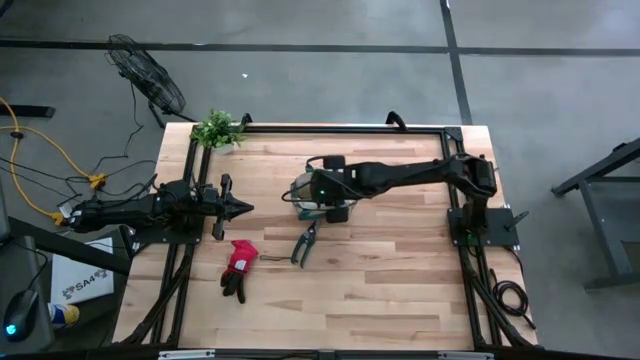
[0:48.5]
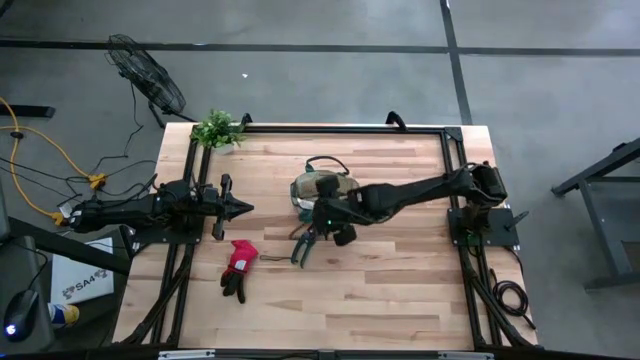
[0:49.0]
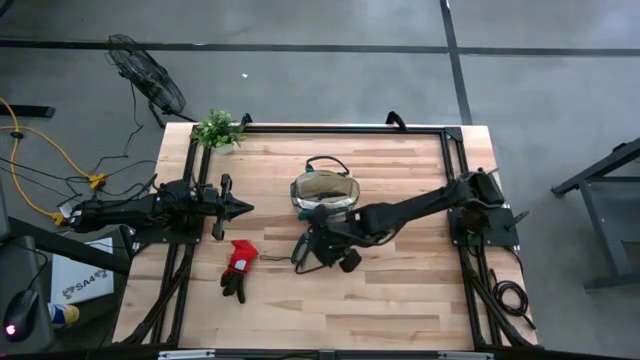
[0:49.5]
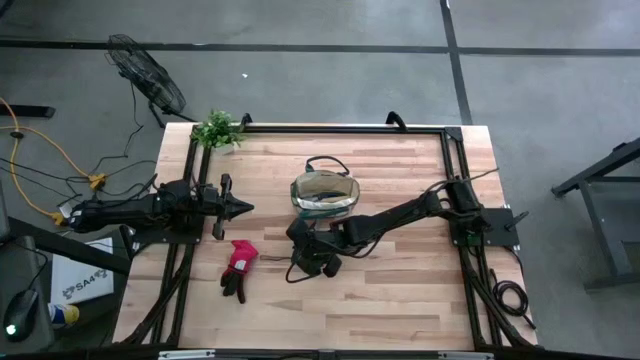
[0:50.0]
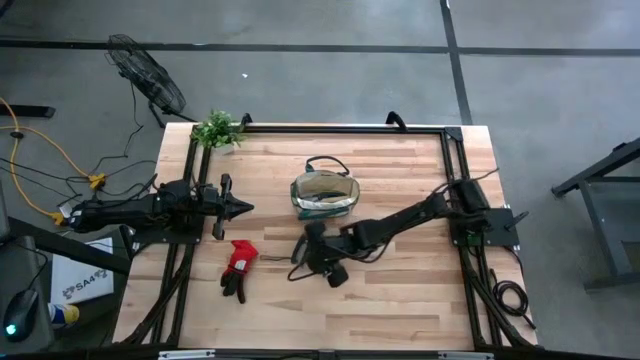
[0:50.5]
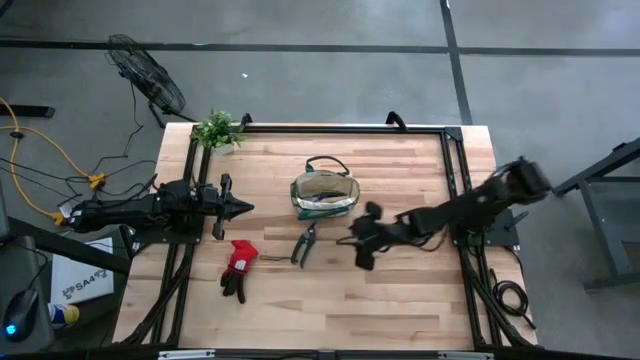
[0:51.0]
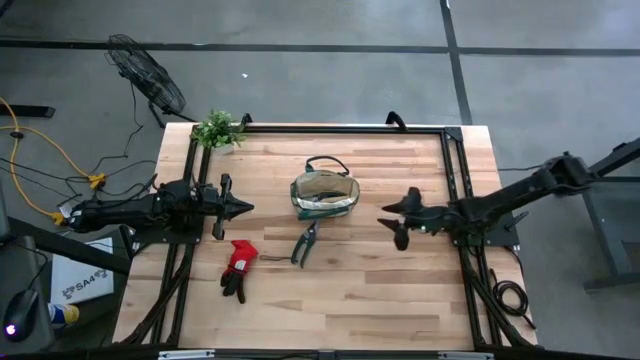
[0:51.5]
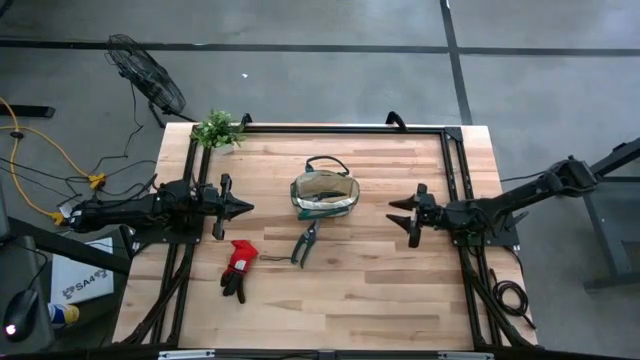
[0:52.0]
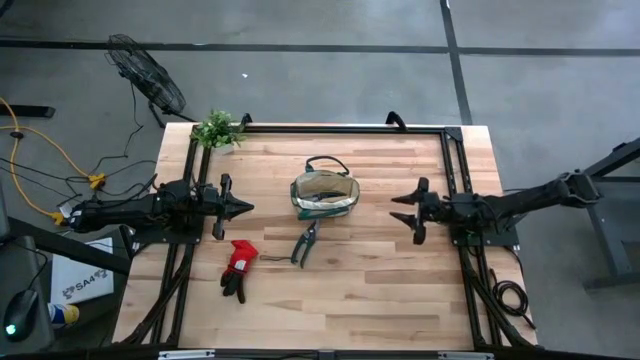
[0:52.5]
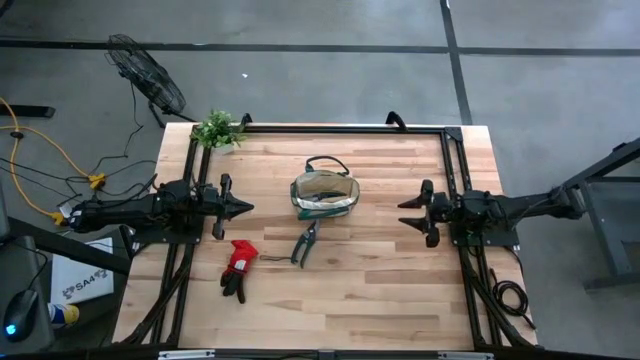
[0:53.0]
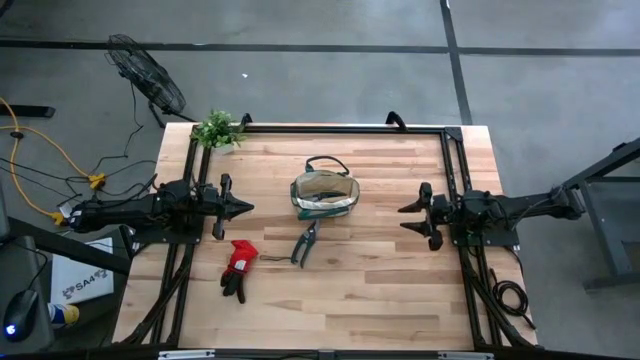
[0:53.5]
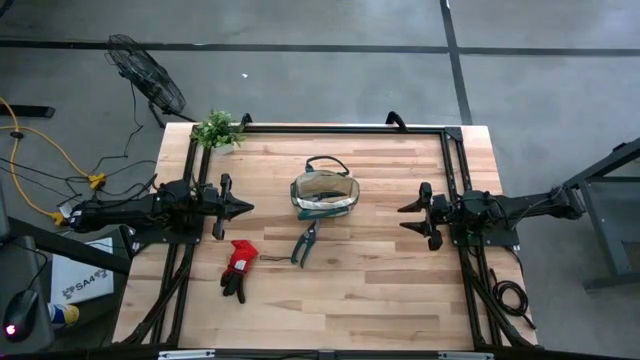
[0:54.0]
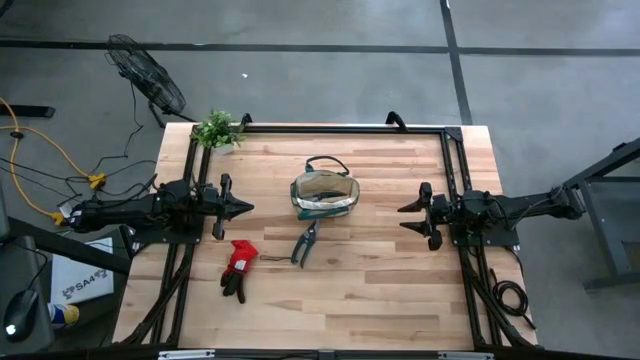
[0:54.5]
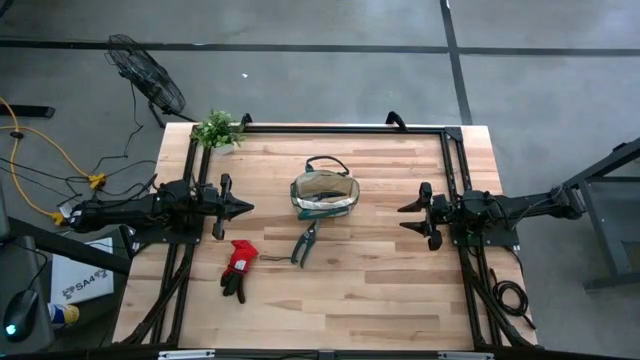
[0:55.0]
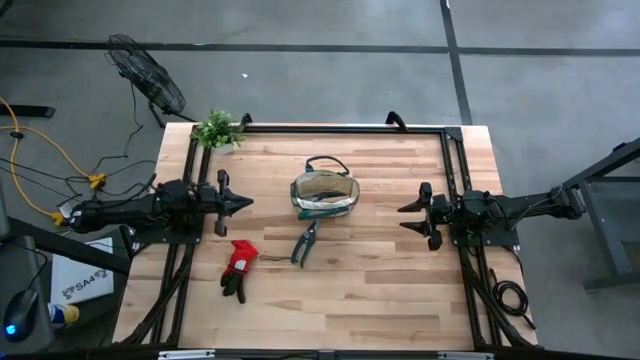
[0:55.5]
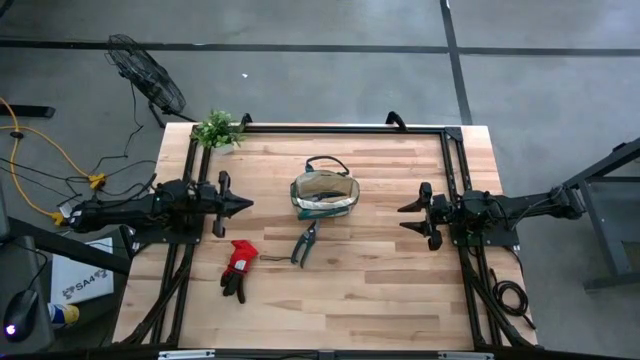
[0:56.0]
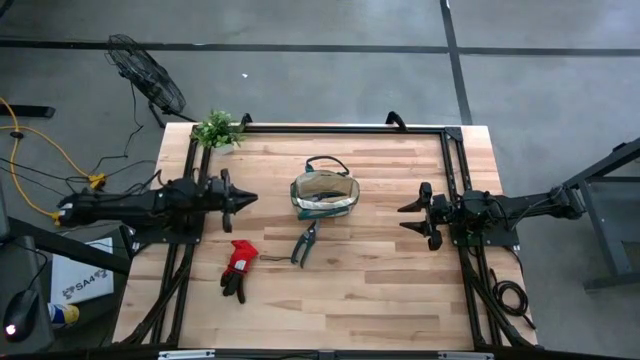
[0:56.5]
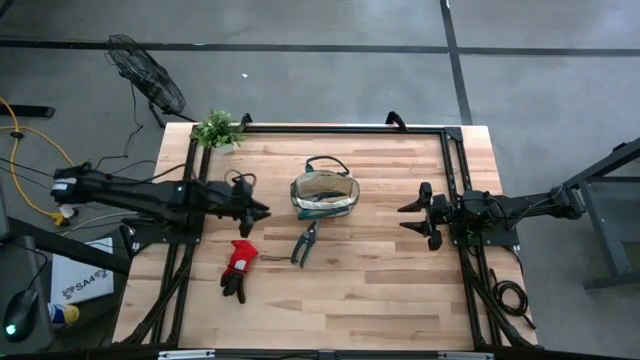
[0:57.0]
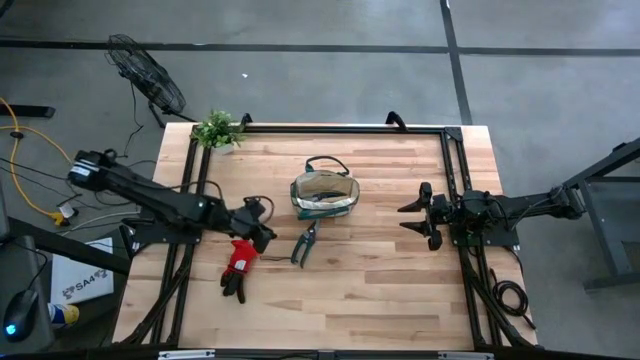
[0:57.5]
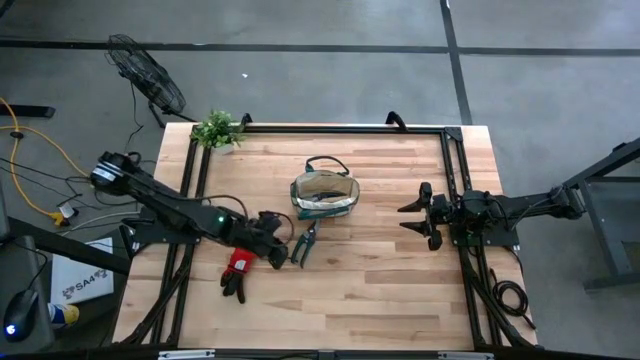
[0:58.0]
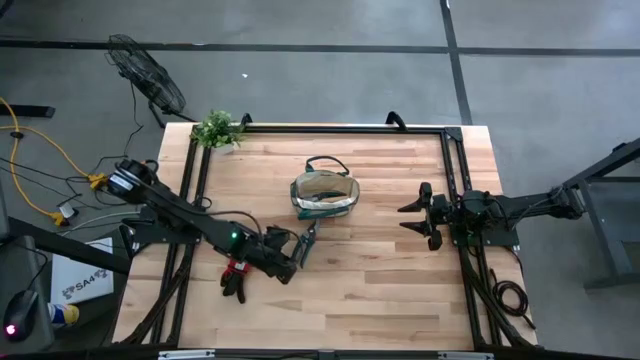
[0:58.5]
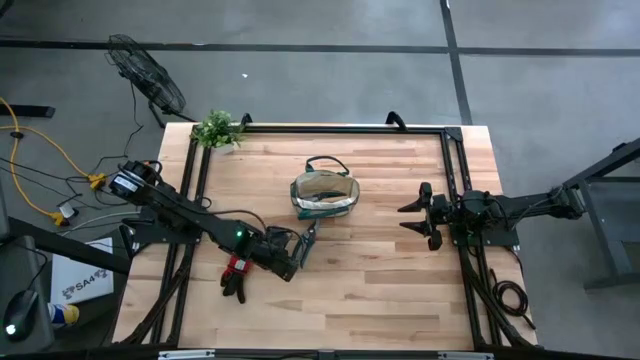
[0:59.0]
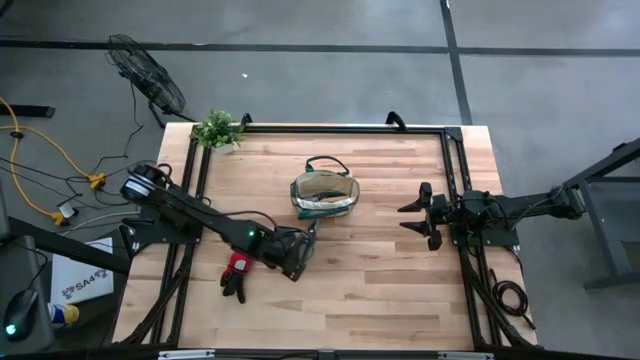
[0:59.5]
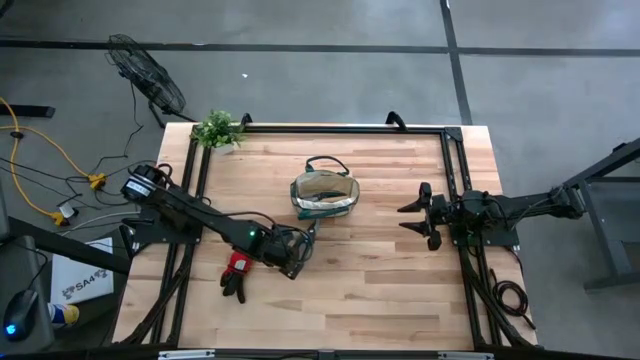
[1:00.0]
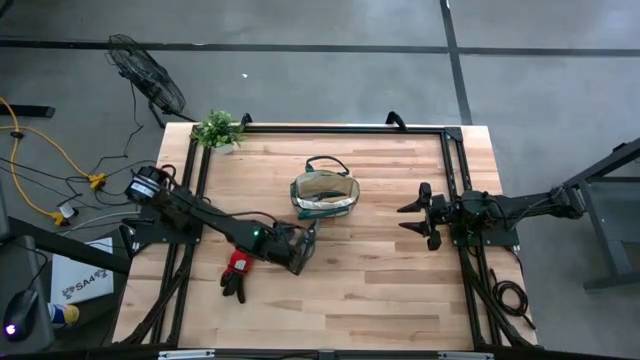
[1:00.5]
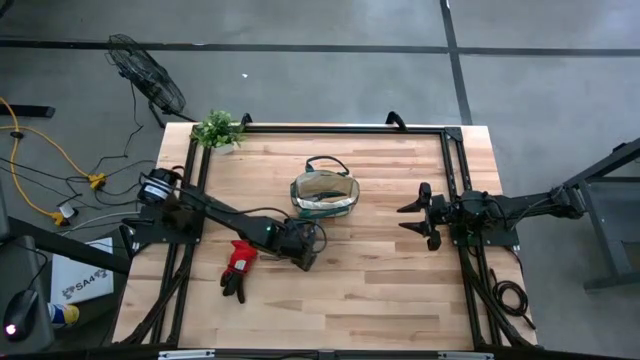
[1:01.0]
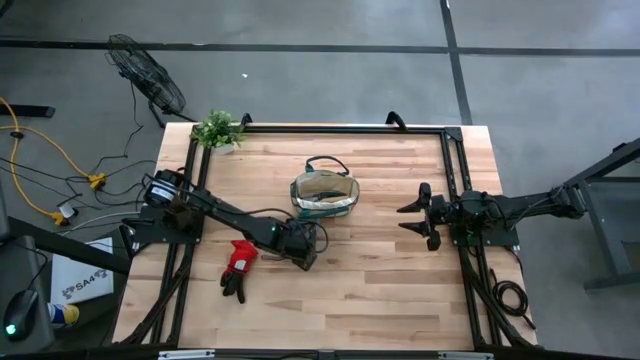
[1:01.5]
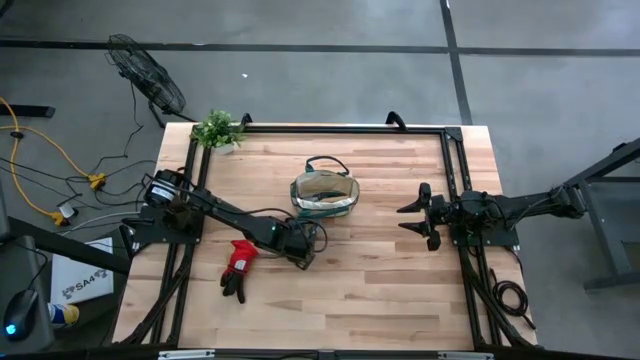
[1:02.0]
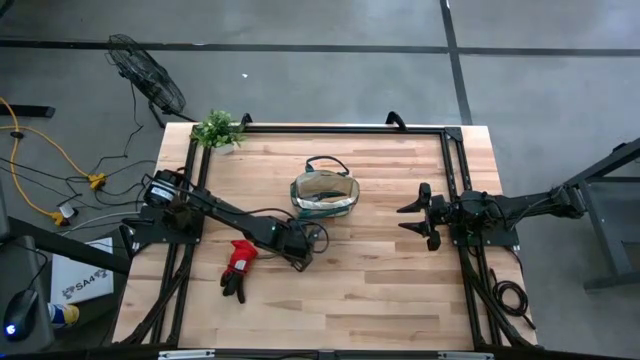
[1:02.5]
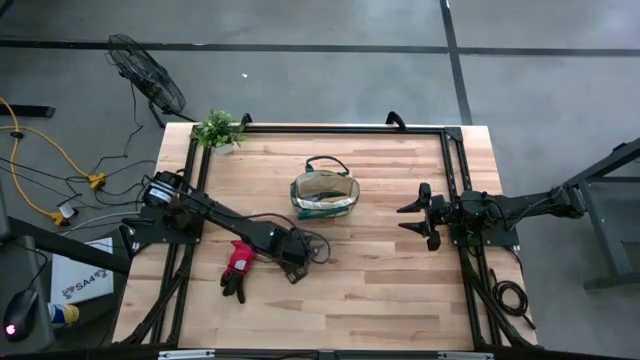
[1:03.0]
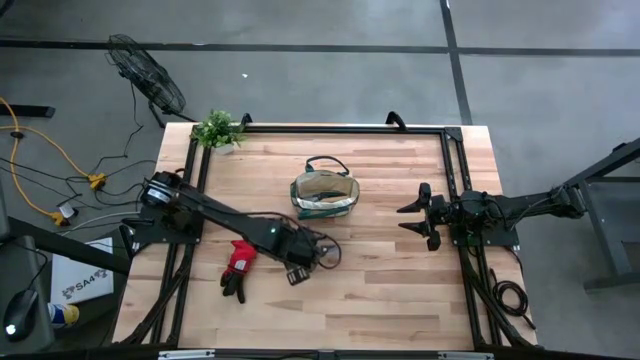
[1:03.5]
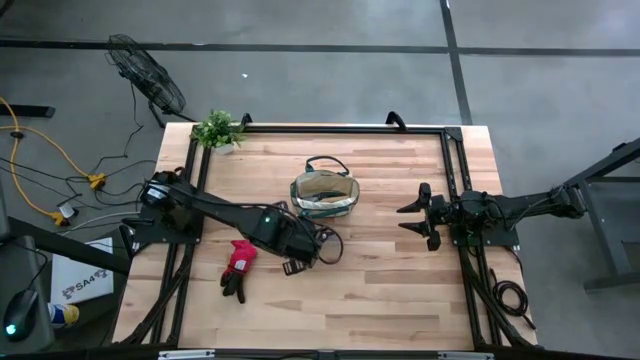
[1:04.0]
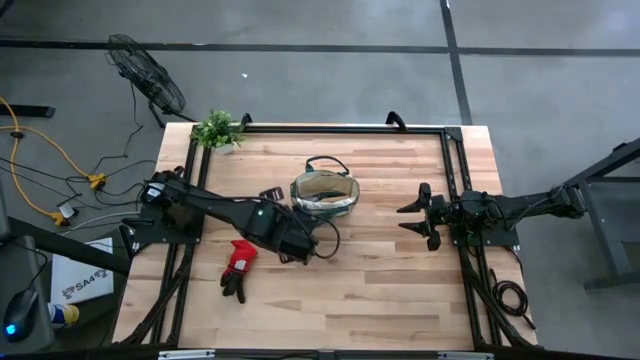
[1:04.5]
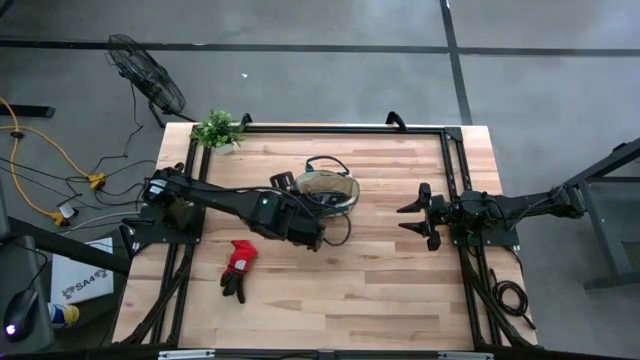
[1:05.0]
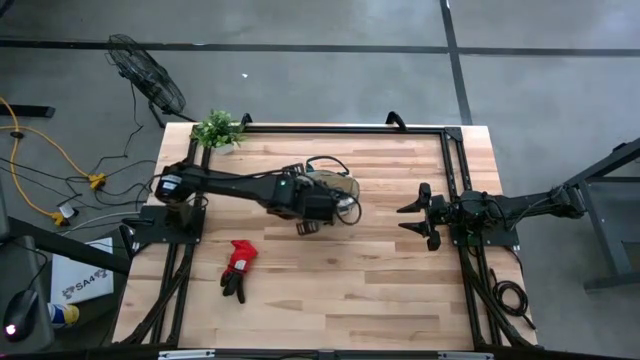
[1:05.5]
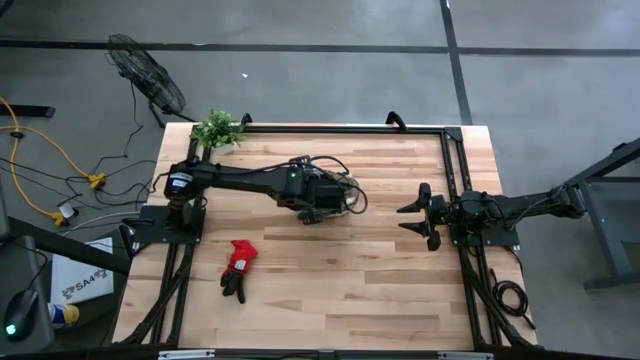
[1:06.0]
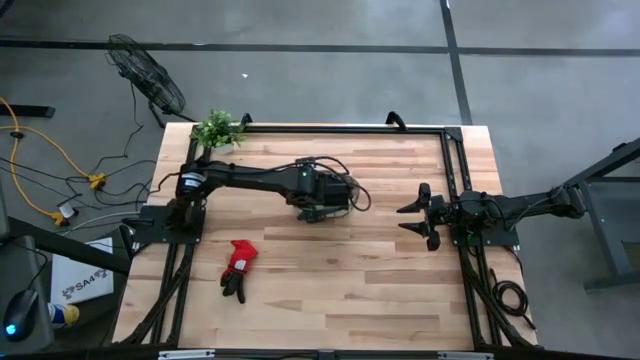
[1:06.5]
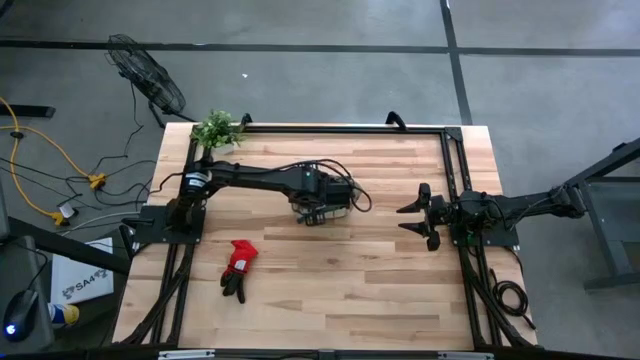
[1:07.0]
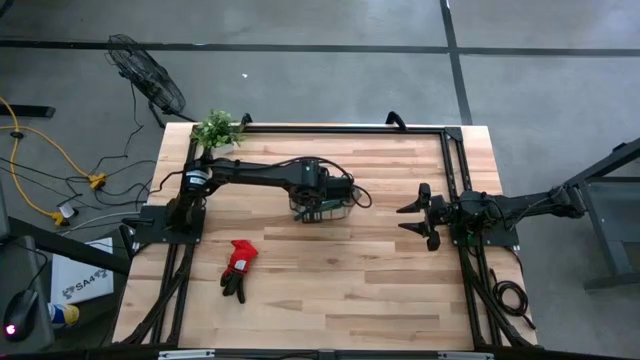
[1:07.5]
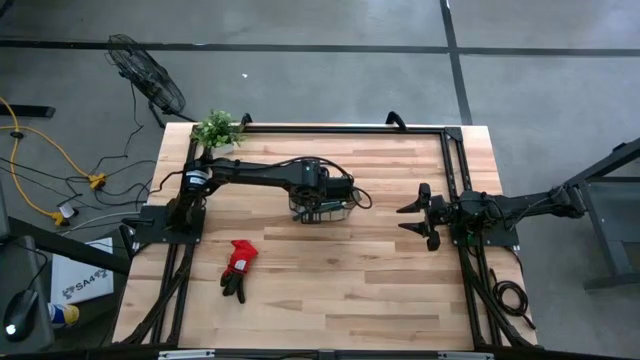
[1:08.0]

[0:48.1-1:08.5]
Task: Pick & Place Garden tools in Gardening bag
Put the green shears into the gardening bag
